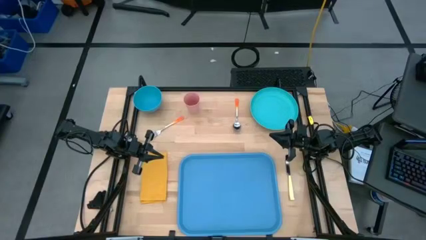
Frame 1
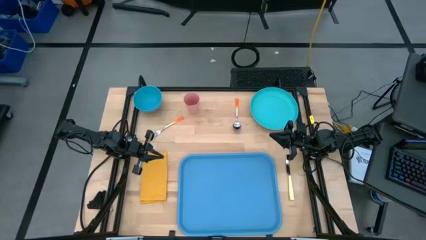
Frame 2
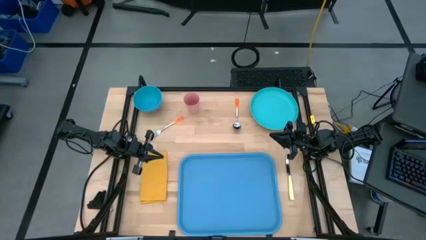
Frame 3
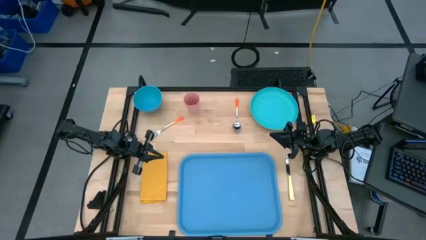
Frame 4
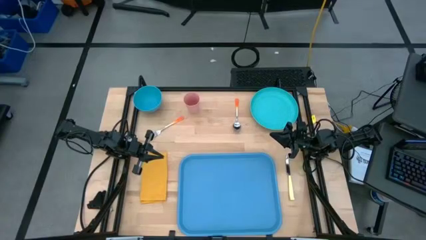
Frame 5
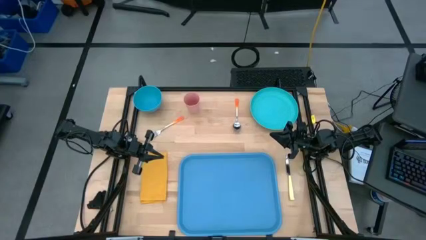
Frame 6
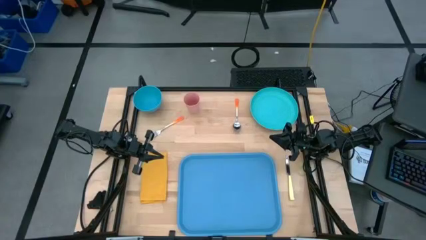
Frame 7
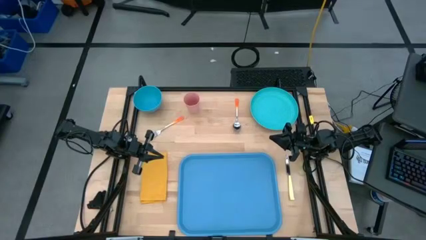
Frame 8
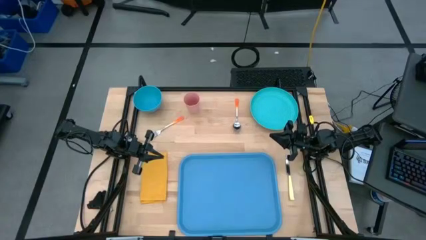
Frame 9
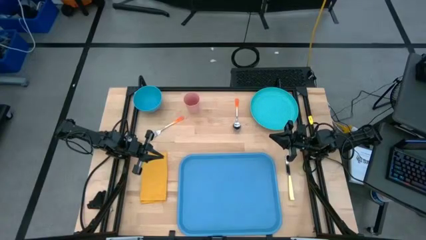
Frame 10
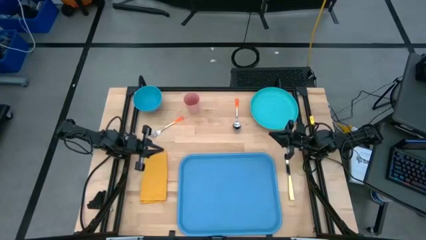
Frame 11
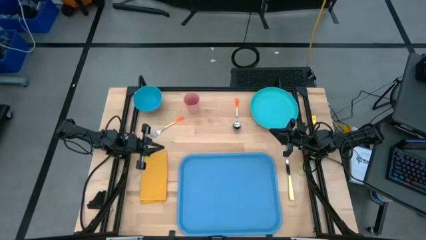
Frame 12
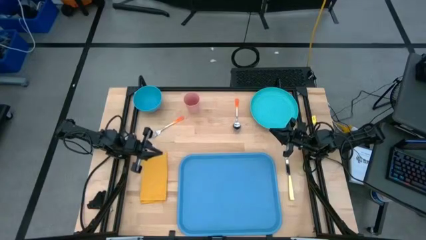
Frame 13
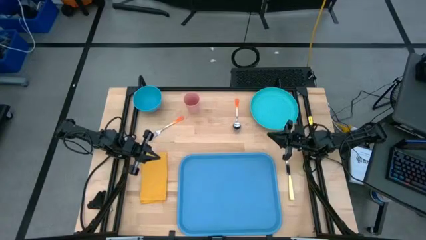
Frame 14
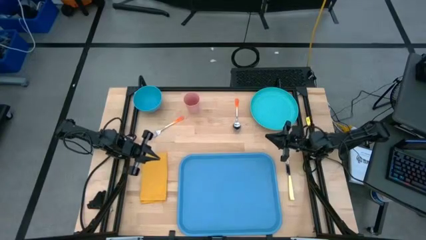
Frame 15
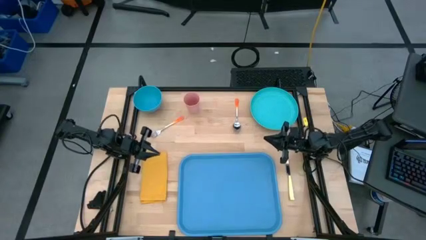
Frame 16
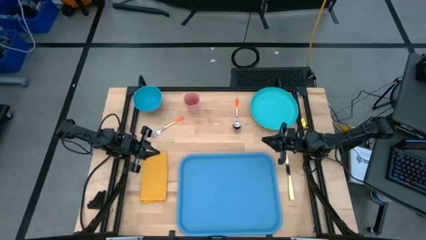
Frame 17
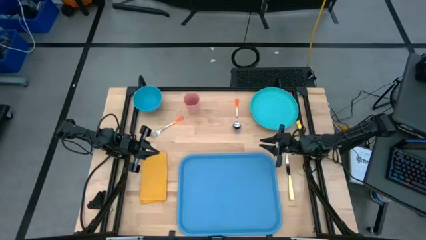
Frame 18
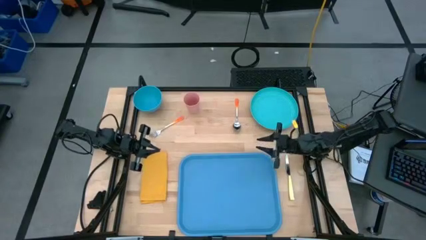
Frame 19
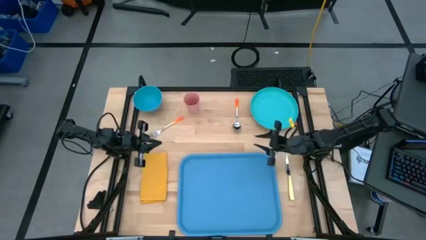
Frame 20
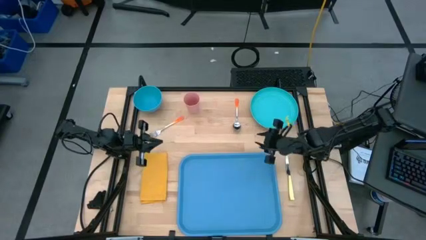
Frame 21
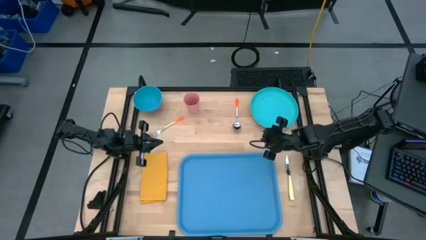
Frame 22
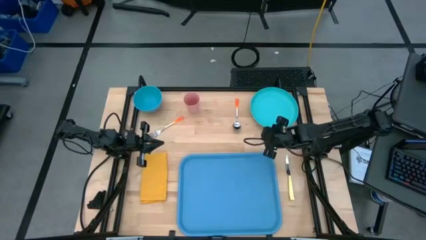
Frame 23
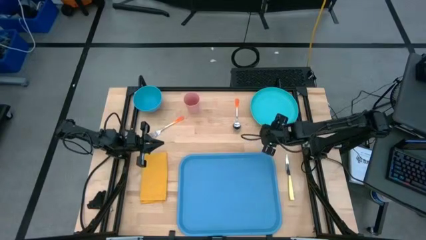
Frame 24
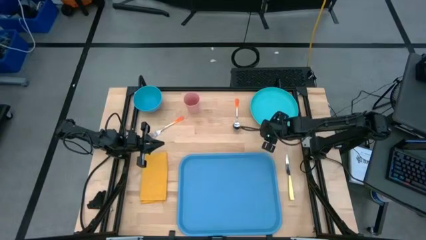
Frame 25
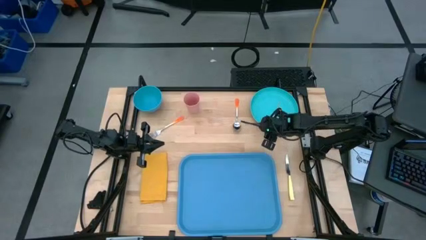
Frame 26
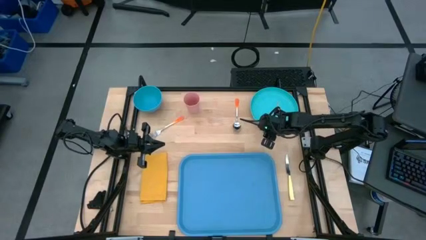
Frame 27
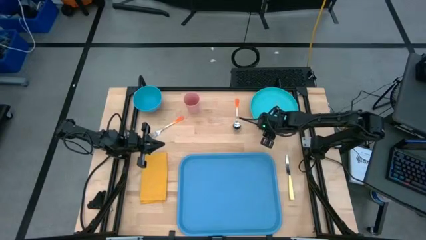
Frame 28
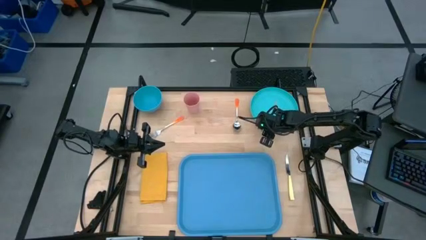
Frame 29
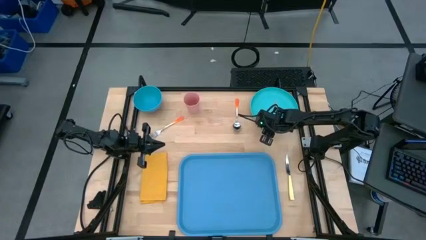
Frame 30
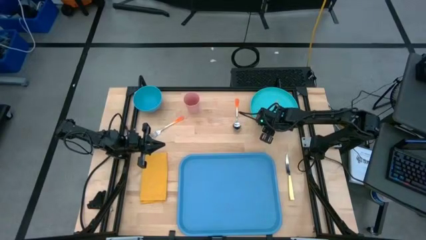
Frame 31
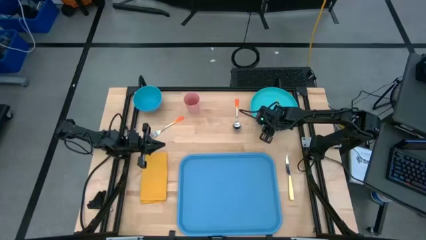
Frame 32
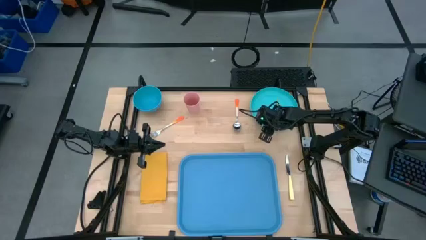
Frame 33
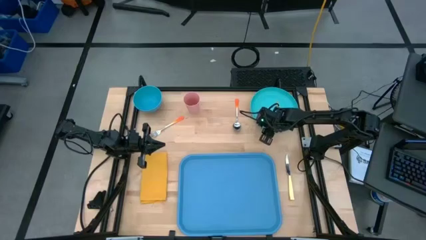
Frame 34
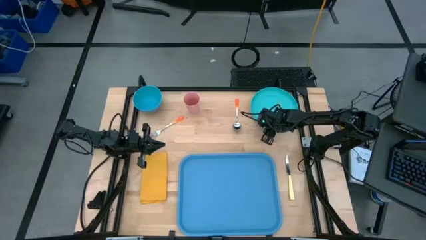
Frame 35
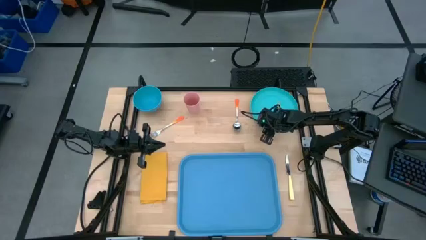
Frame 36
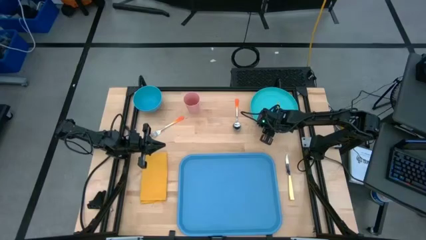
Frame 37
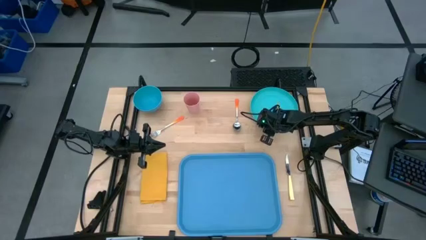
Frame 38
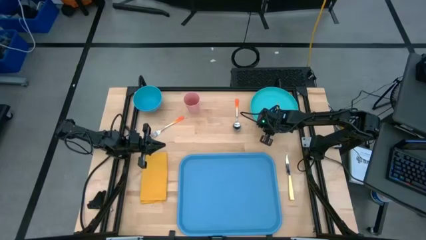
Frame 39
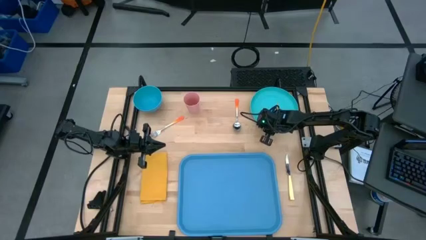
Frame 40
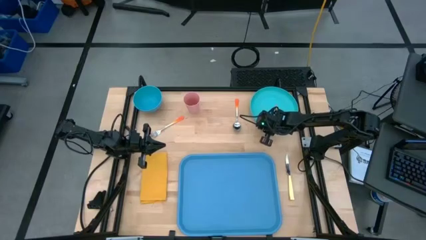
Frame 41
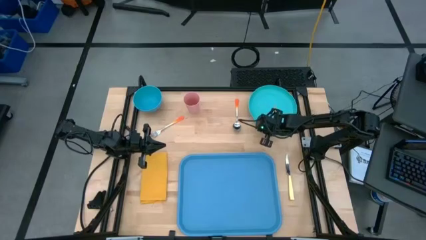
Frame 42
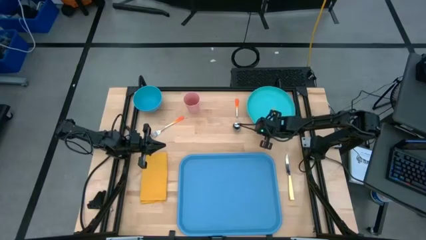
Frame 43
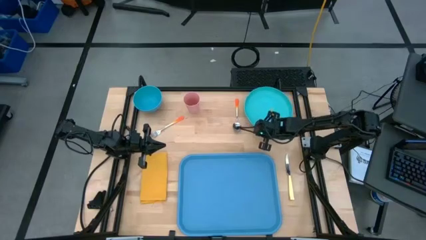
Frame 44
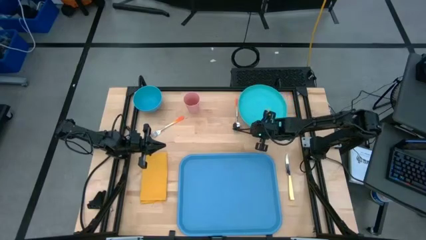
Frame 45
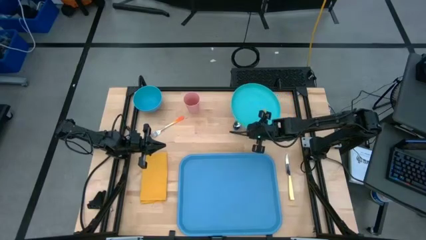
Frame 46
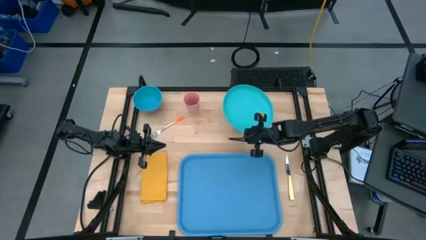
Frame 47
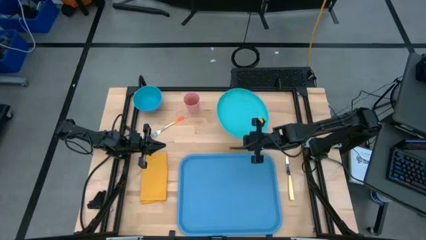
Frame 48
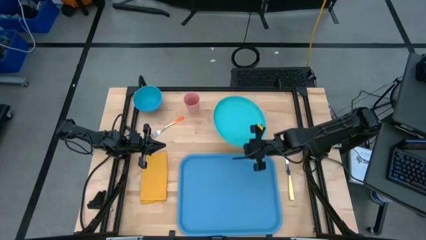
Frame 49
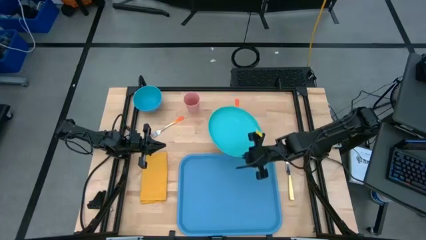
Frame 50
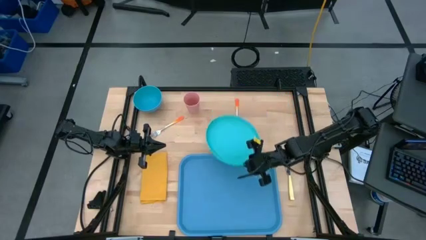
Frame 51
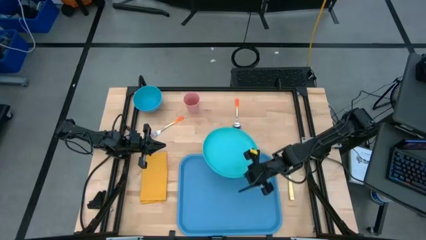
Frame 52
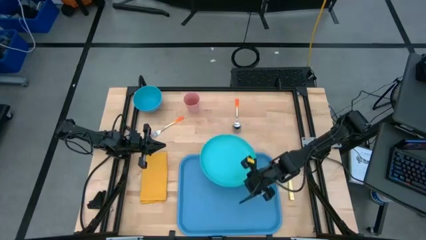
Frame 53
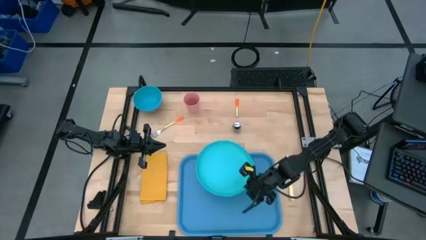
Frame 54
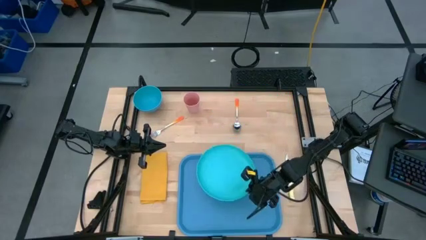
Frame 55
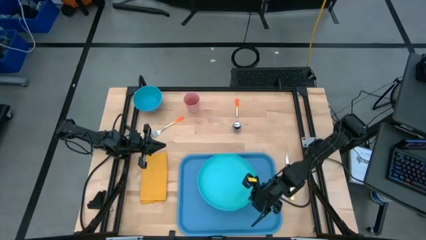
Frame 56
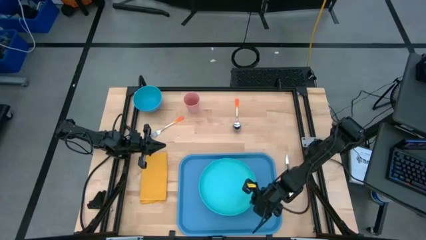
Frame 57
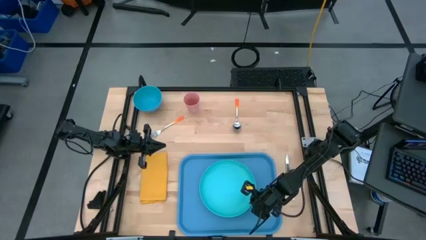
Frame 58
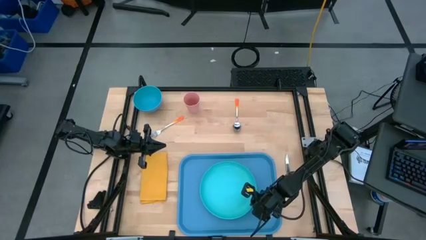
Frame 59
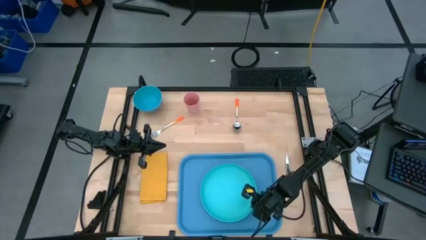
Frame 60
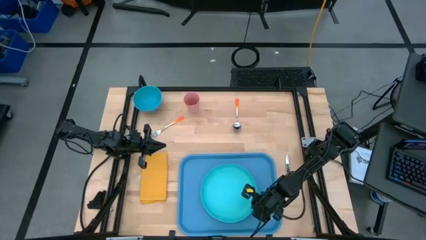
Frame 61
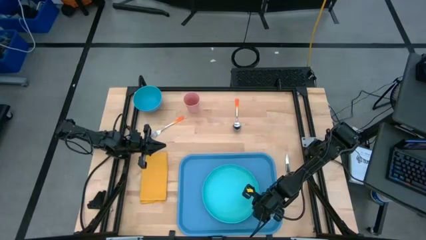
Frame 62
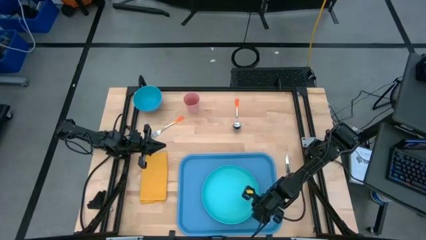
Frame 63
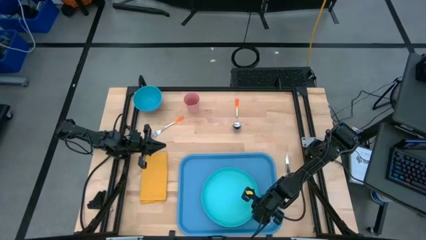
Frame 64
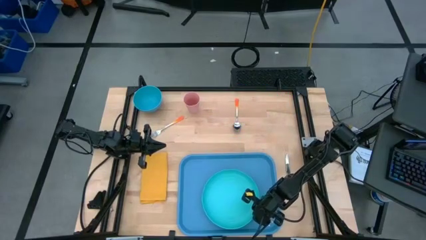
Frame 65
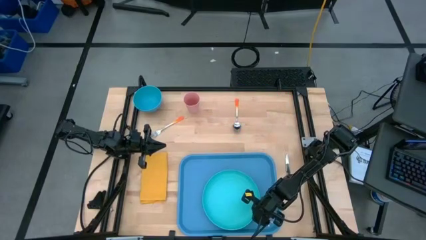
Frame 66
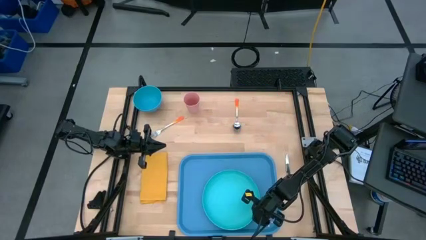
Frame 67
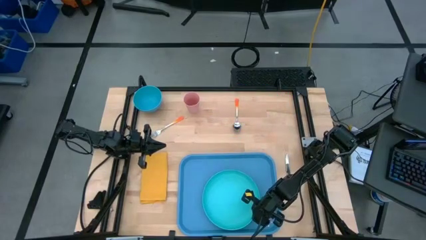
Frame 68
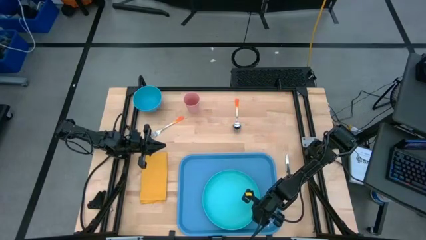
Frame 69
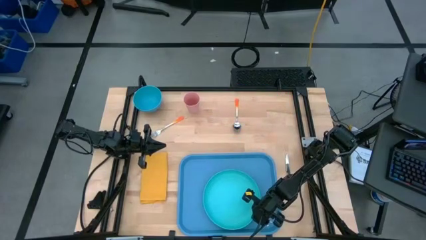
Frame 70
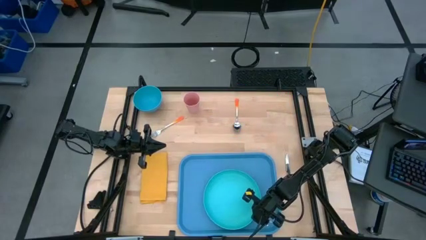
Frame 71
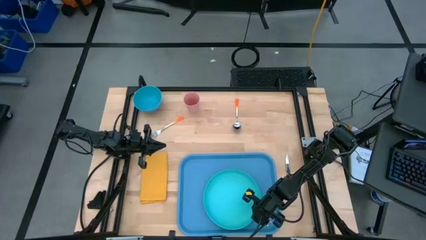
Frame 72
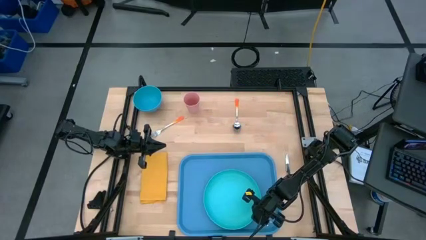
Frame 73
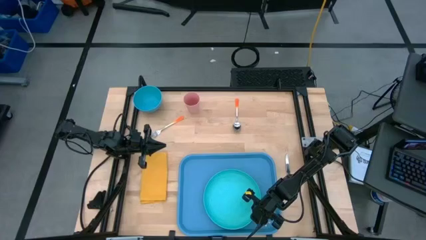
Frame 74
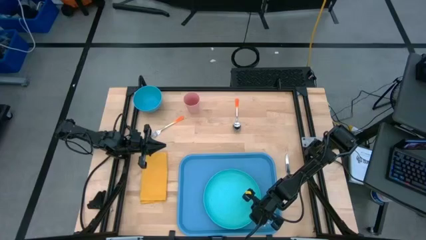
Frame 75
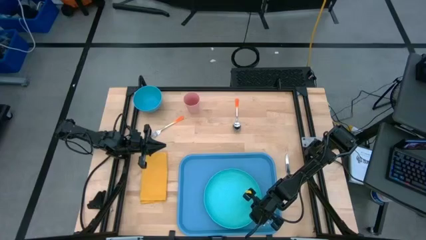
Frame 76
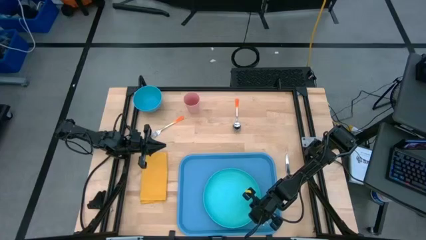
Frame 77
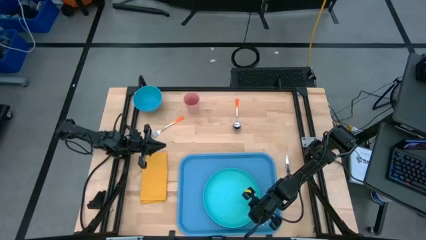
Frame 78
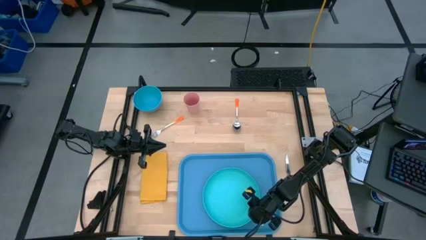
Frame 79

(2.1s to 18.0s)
Task: Set up tray
Put the light blue plate on the blue serving tray
